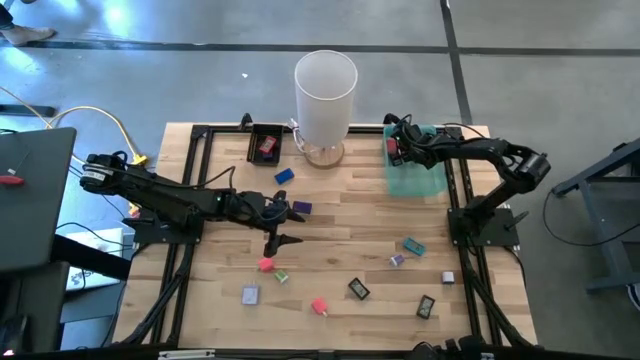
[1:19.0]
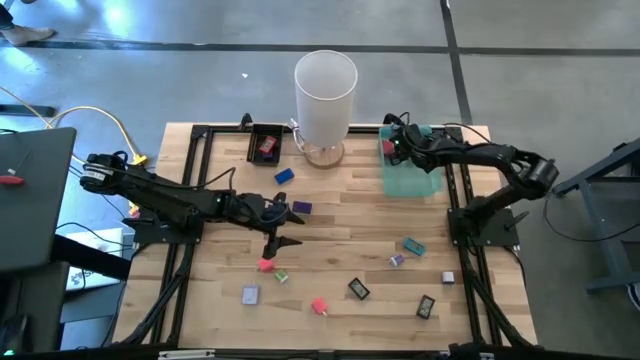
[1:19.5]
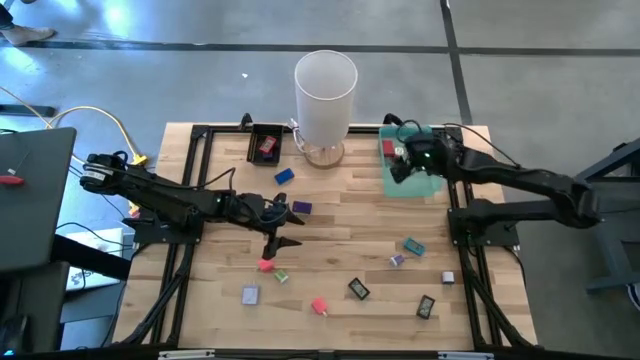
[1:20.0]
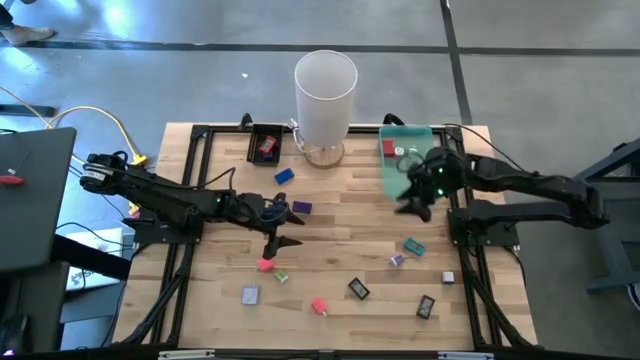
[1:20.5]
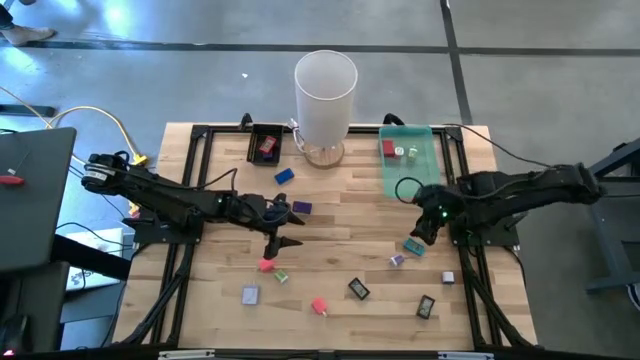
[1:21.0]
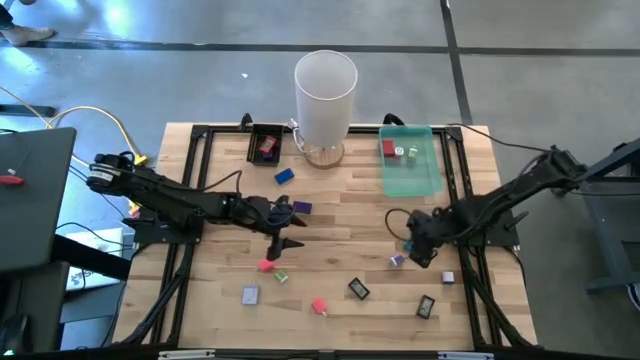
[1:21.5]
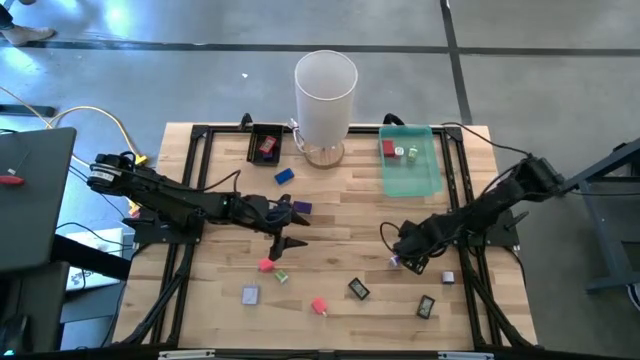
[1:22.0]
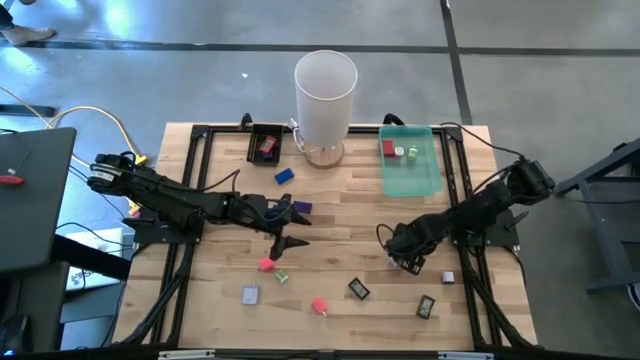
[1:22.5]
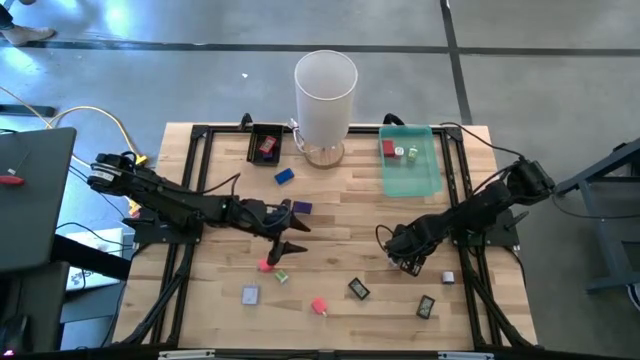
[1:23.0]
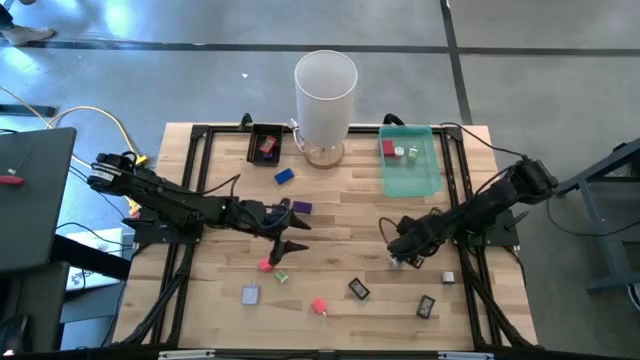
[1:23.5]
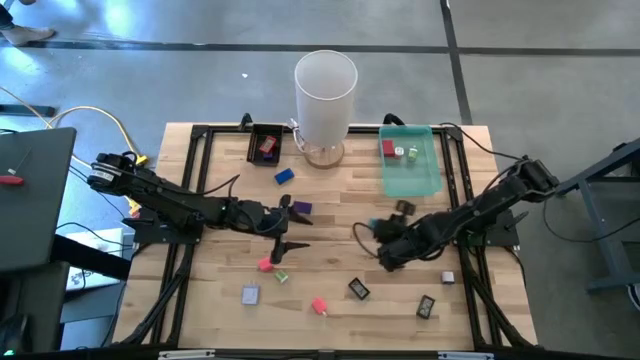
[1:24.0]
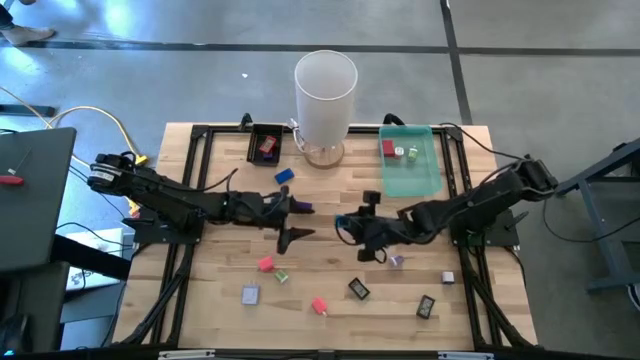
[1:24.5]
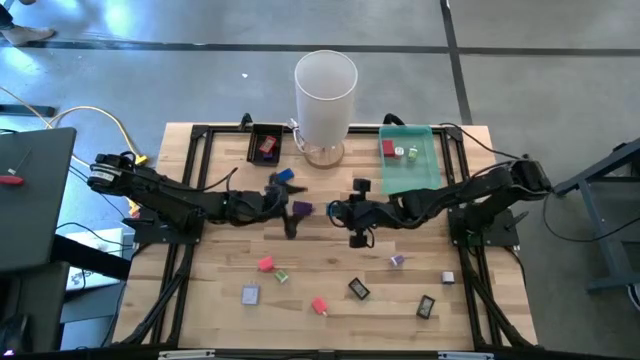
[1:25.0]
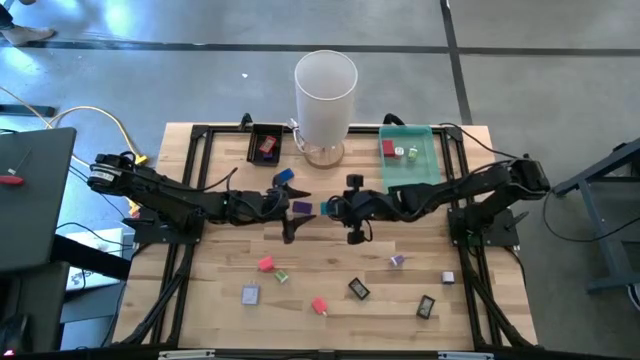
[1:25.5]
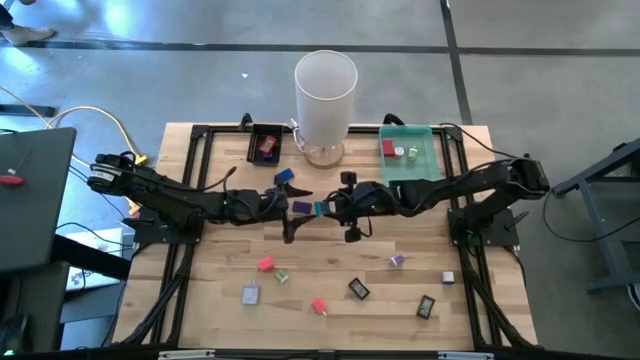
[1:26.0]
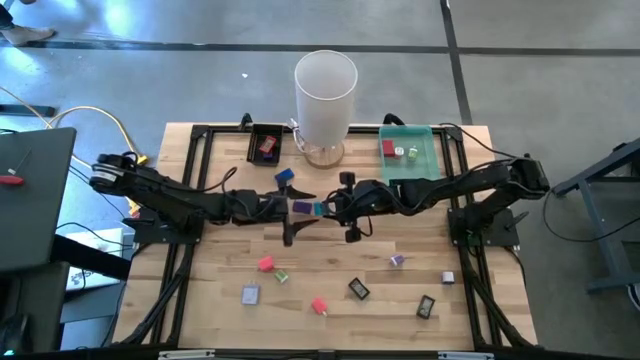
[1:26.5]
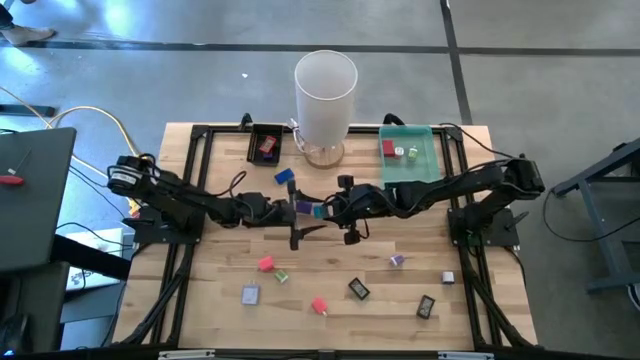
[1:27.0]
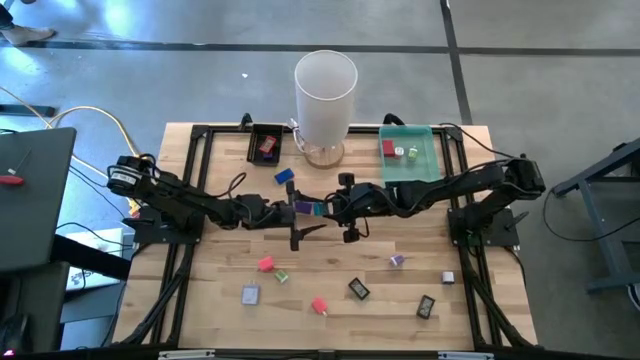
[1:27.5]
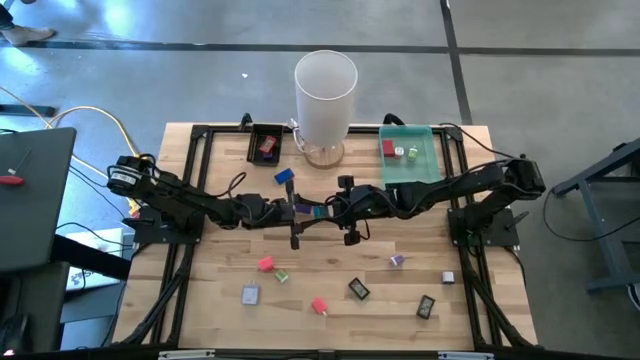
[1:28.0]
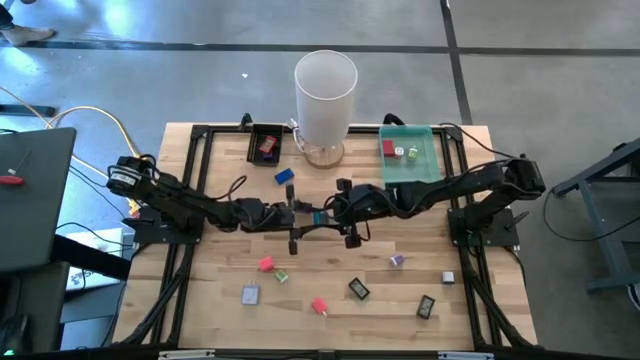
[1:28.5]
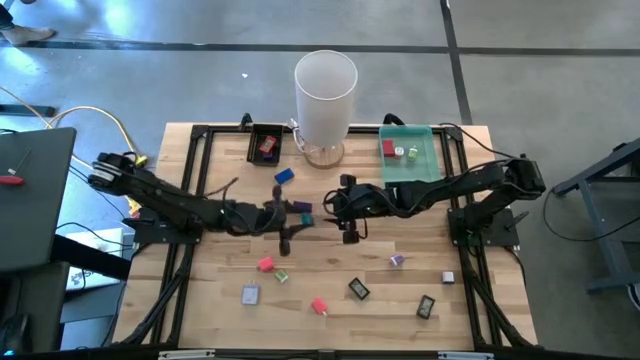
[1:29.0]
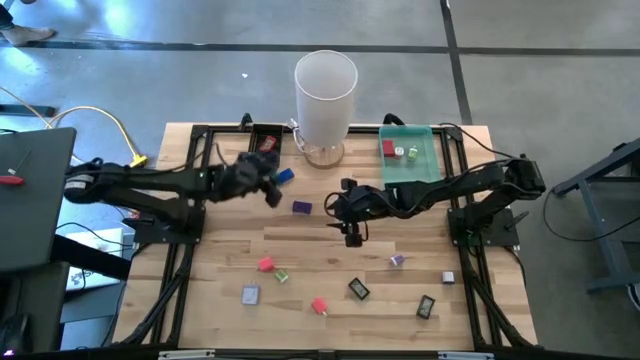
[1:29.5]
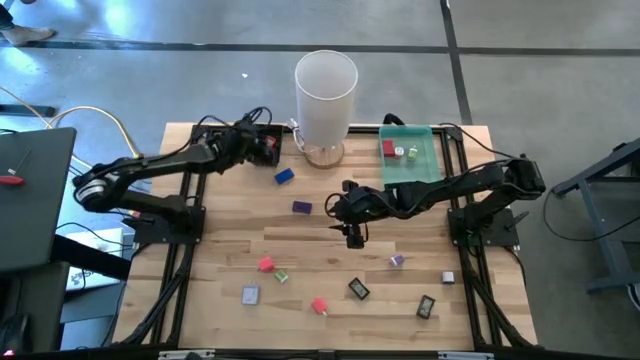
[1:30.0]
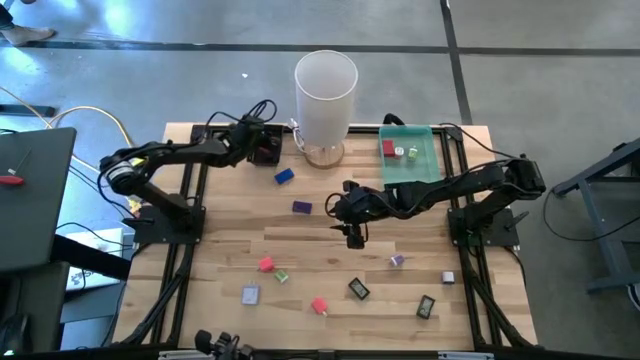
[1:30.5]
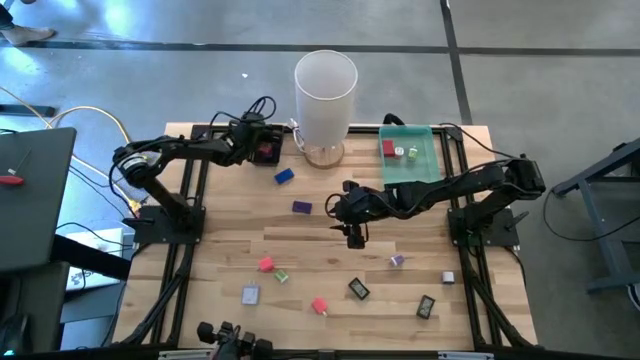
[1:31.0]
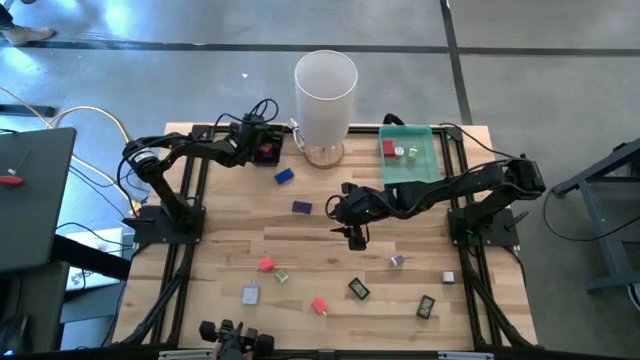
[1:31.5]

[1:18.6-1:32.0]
Task: Pick & Place Office items
Put the light blue digital clock into the black bin

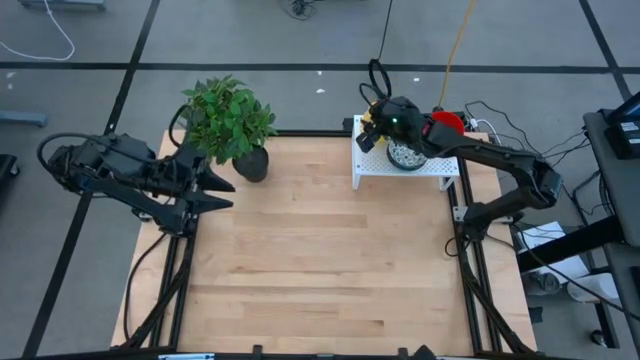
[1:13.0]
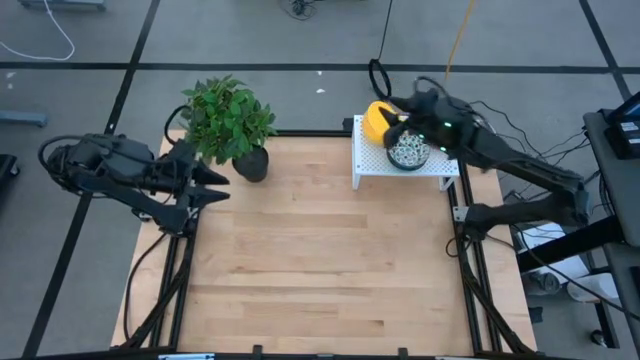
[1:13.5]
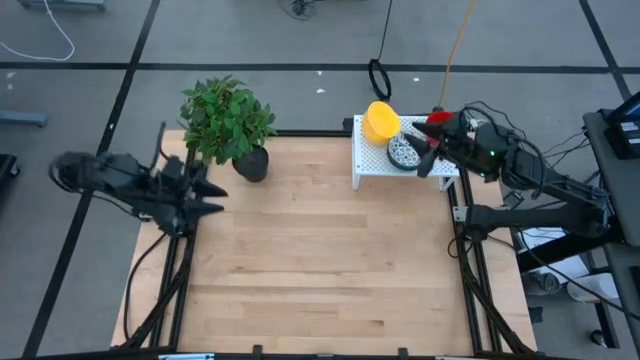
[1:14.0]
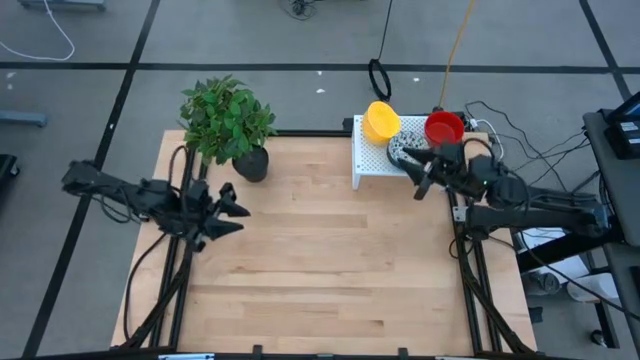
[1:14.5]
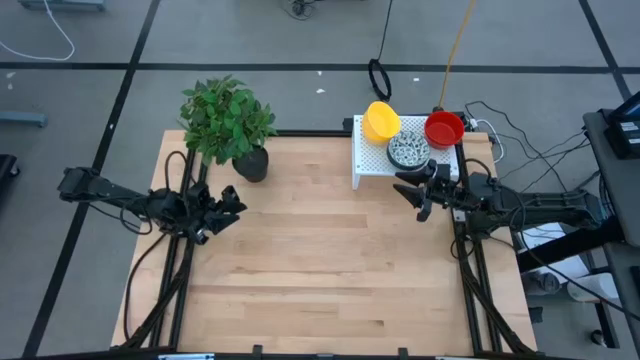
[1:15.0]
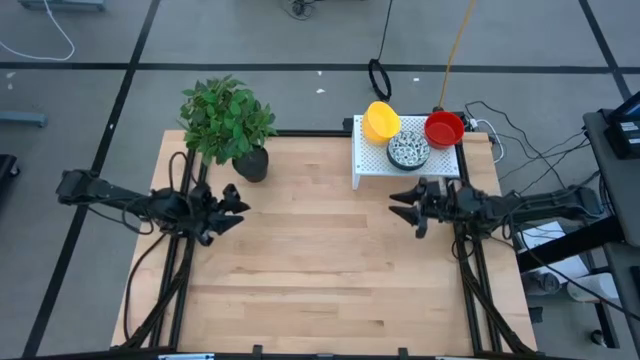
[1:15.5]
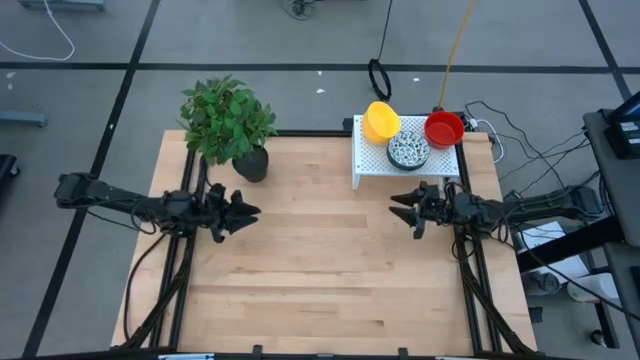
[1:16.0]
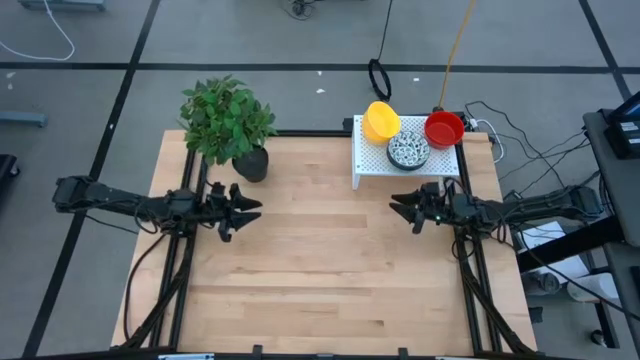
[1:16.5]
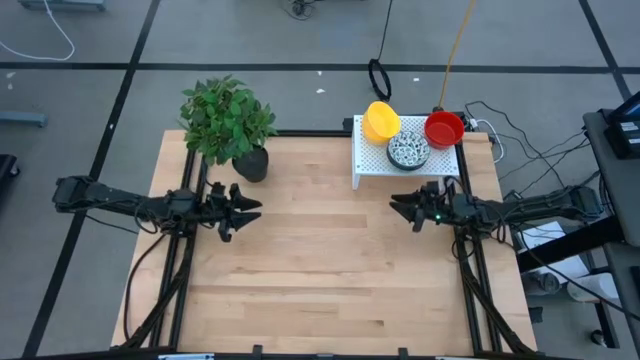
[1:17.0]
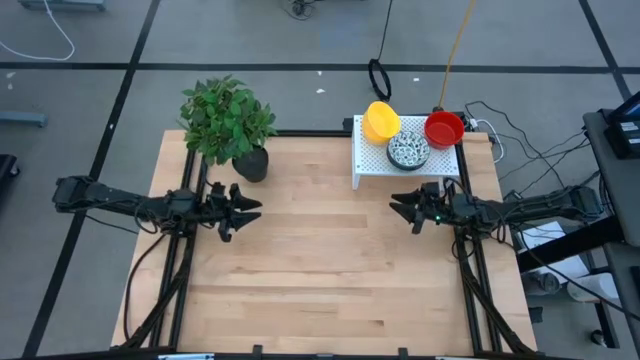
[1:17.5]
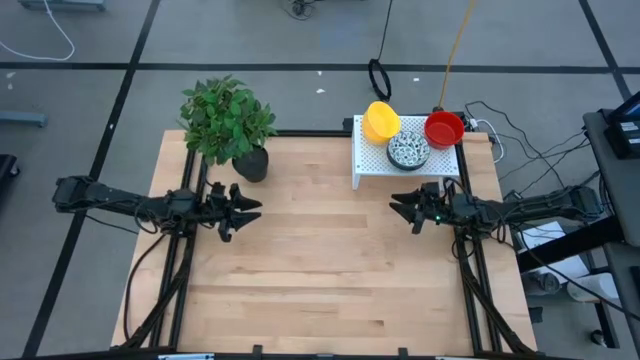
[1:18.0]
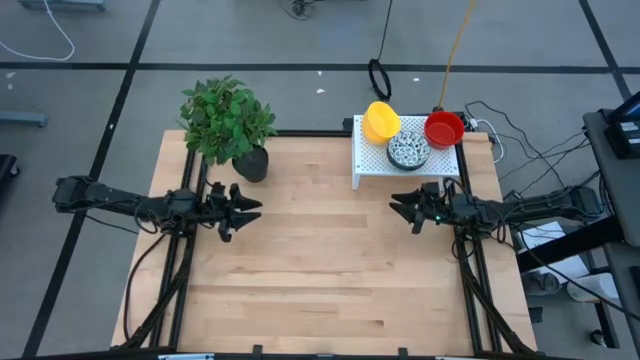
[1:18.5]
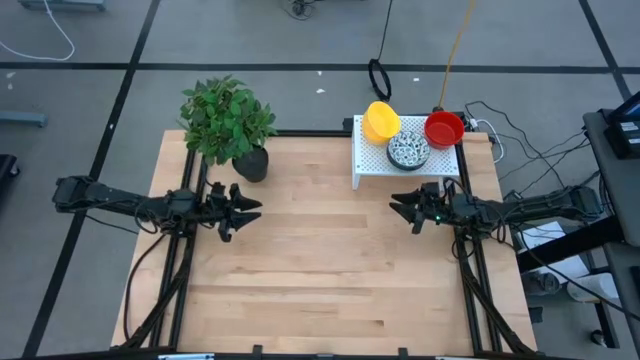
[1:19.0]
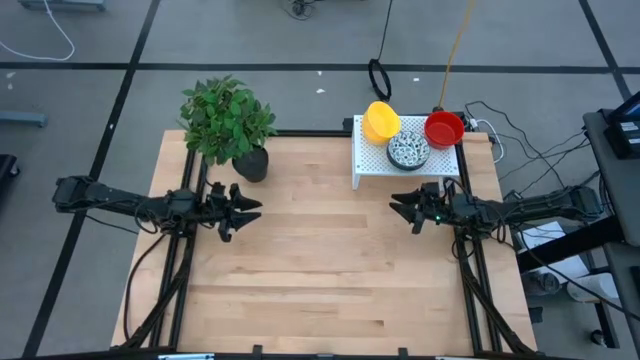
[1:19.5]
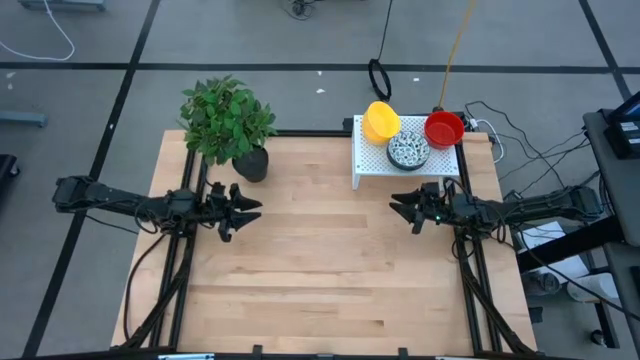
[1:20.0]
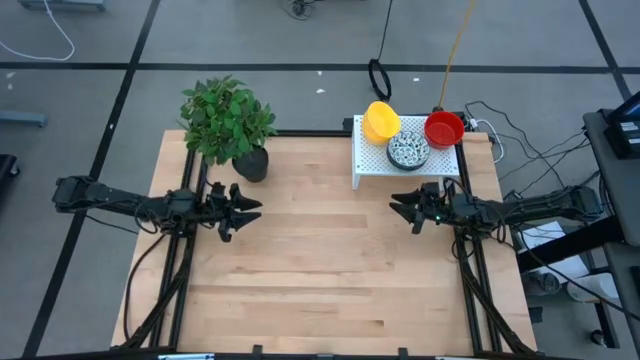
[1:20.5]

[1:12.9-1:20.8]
Task: Pick & Place Mini bowls
Return to Home Position
